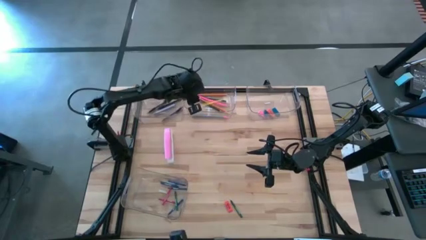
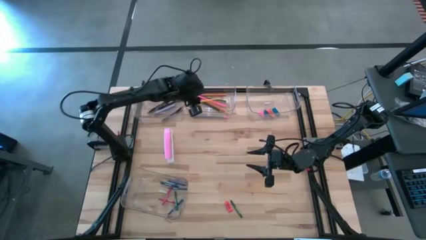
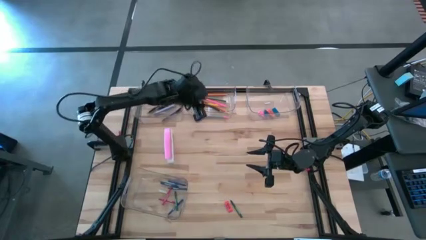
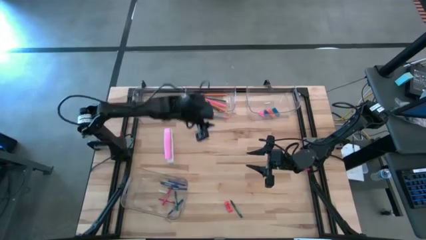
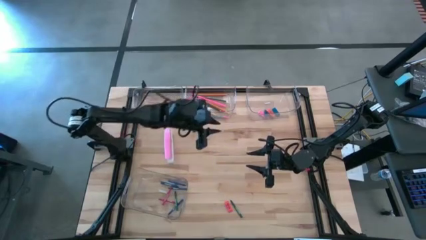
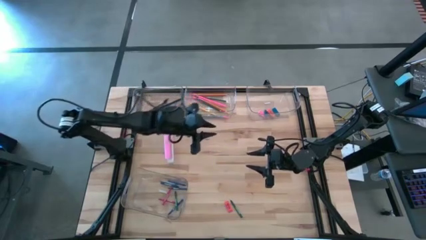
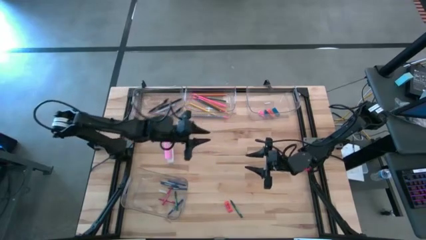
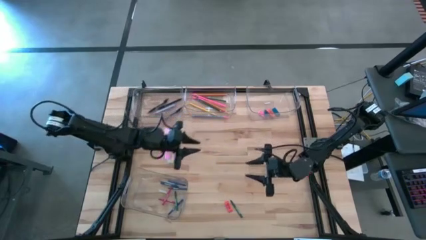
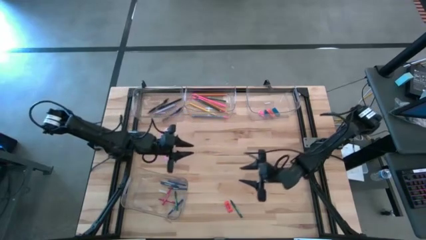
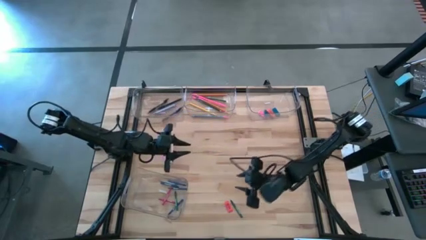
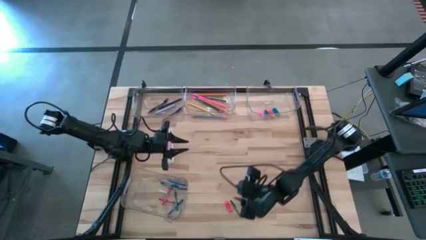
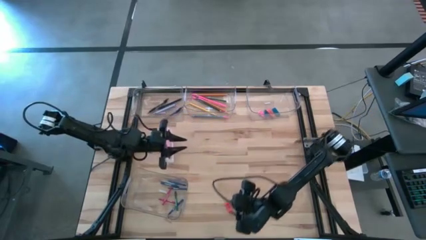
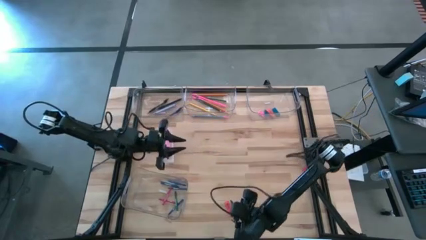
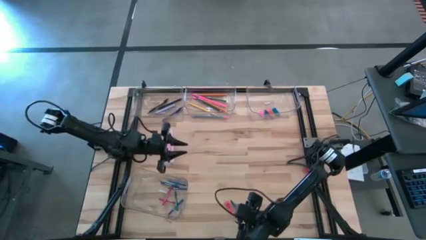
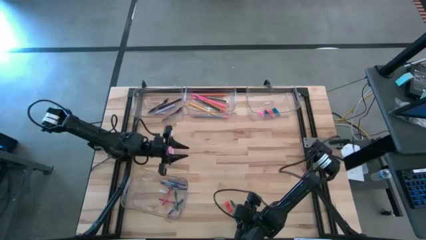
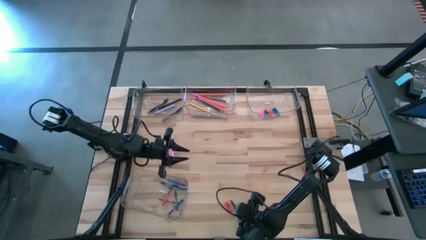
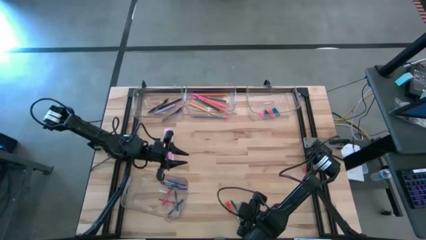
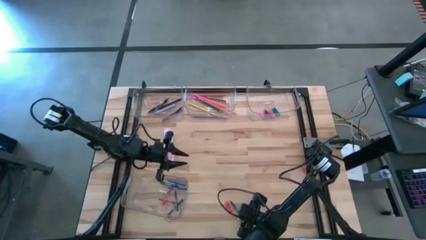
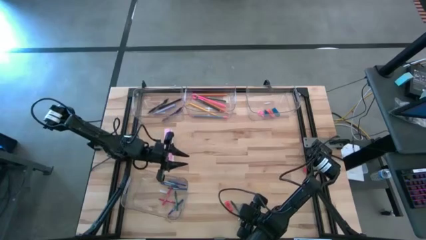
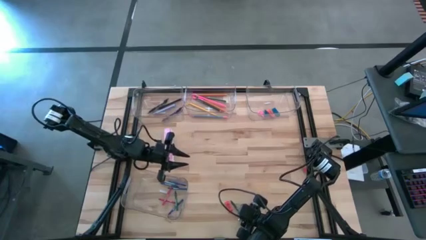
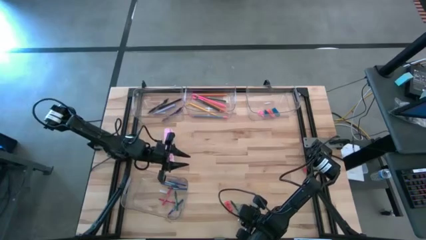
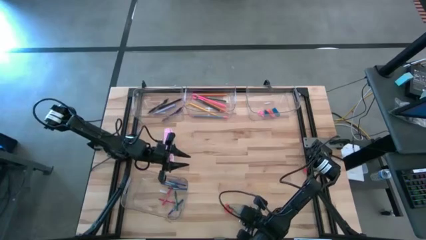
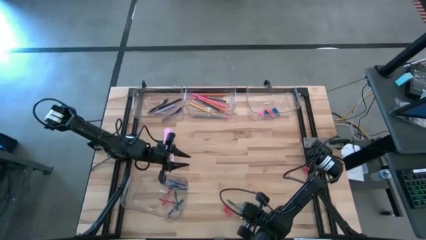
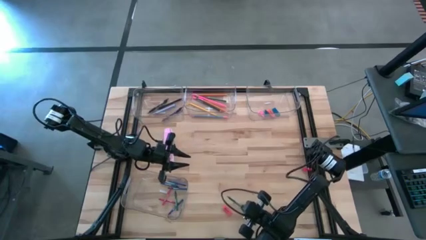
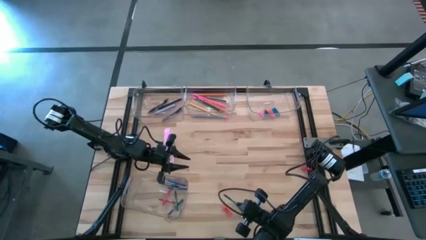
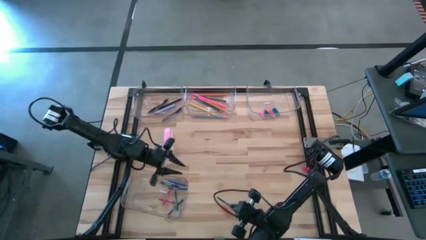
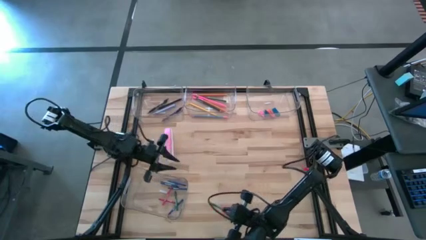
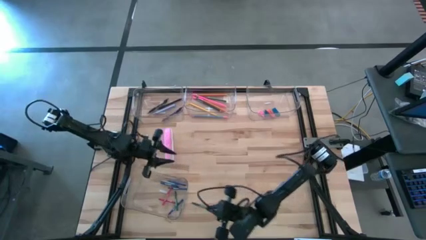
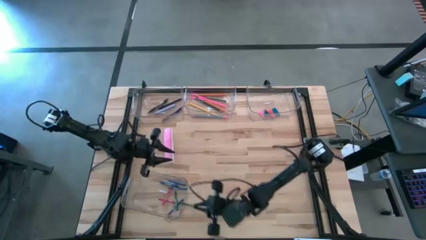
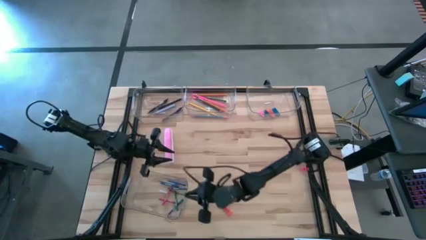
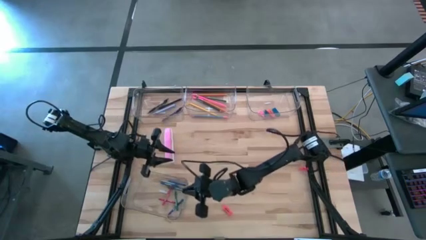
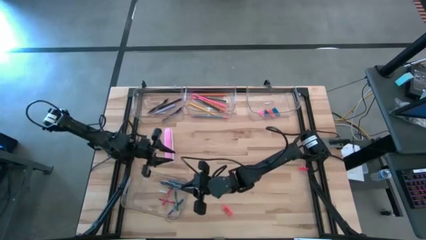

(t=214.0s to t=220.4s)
Task: Sort crayons/erasers/pens/pencils in bins
Put the green crayon into the bottom left transparent bin

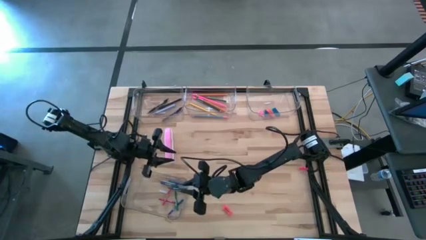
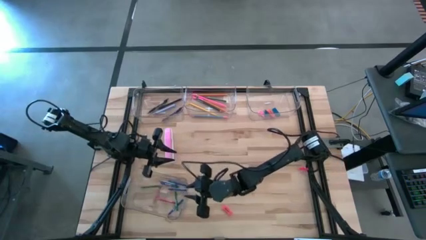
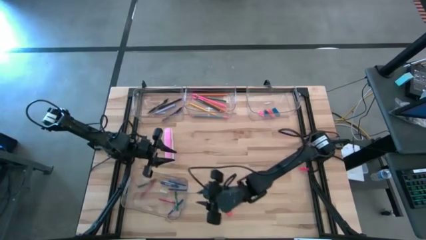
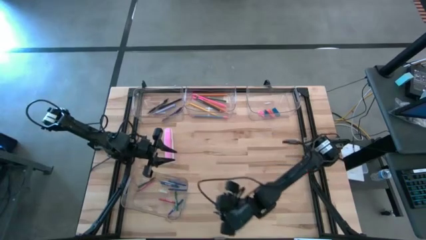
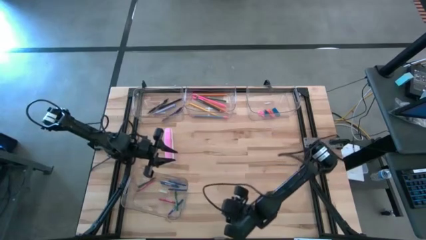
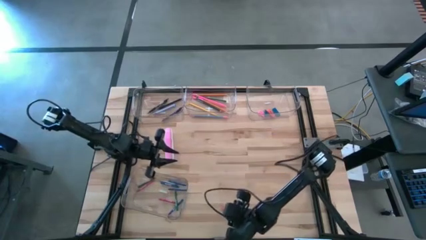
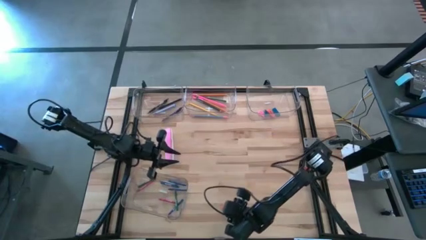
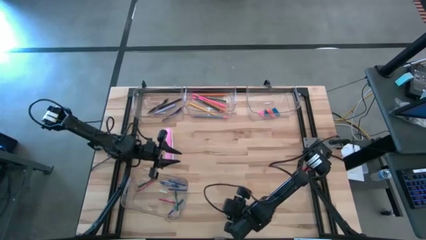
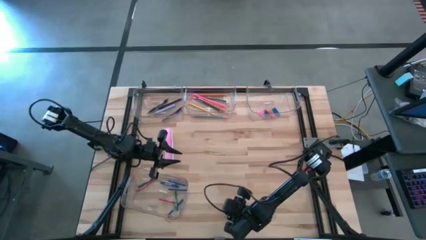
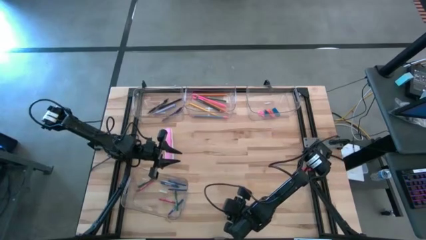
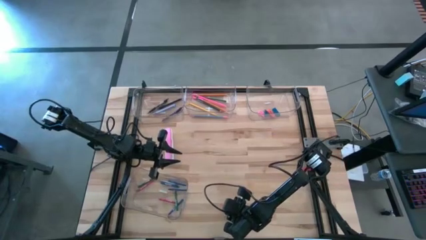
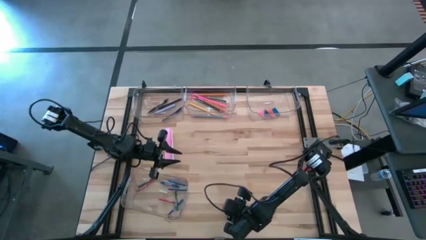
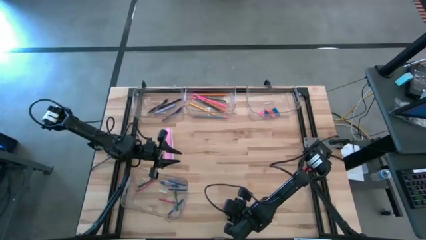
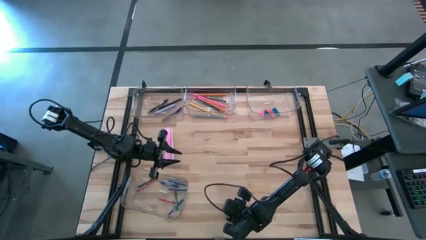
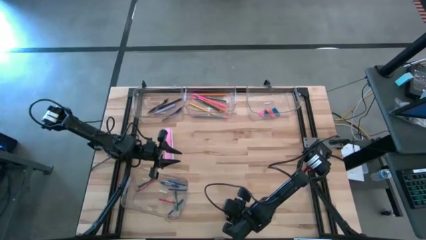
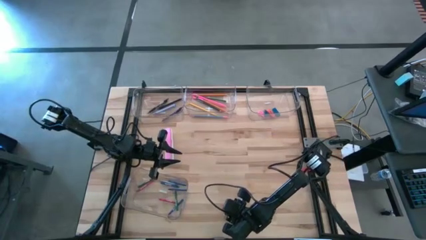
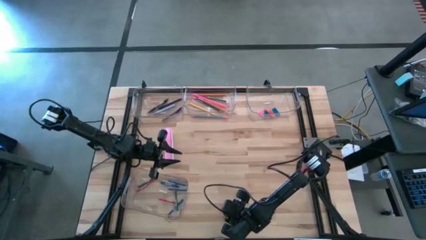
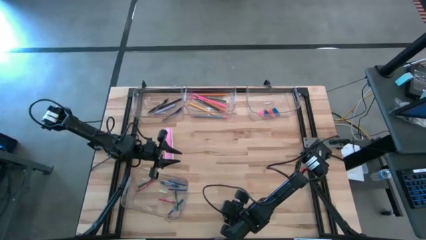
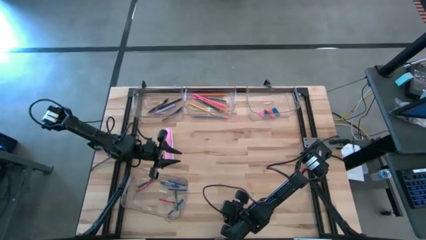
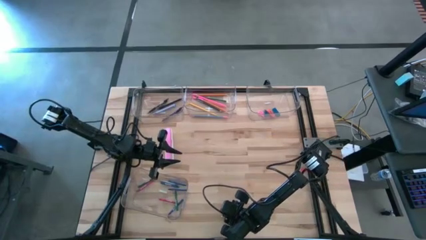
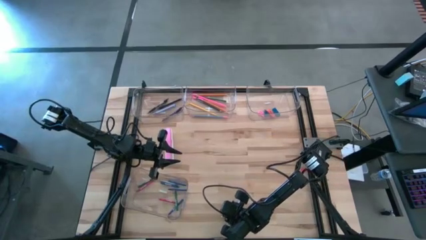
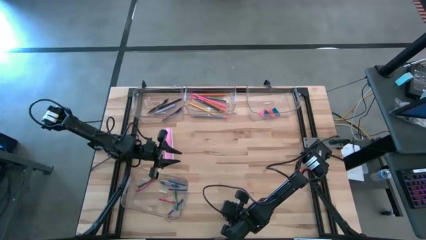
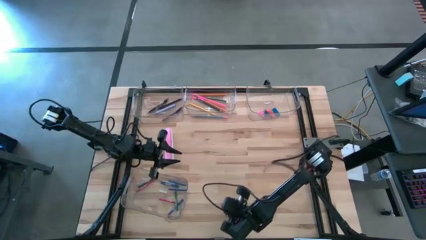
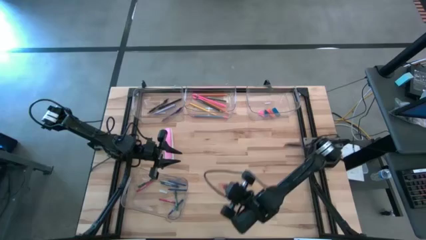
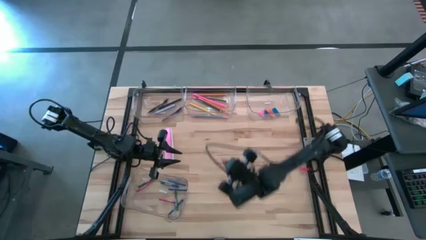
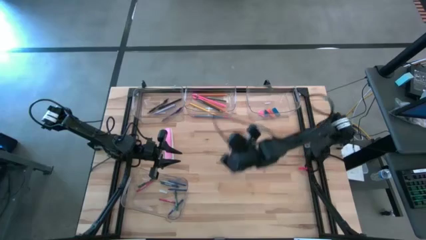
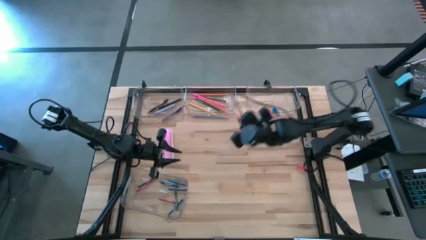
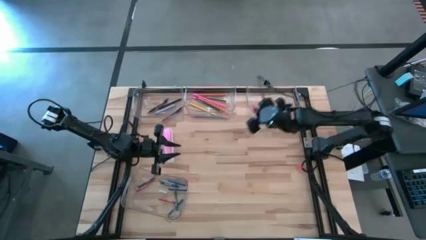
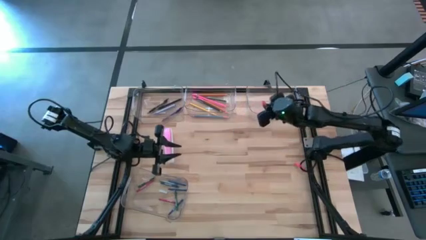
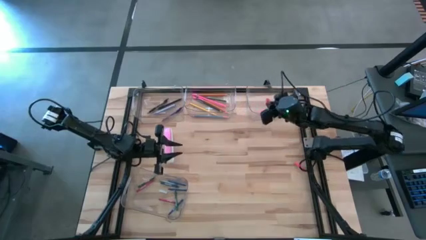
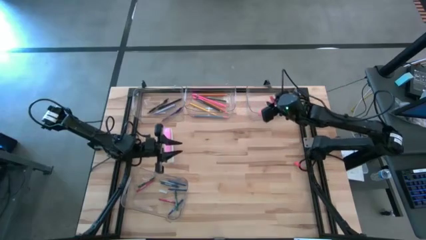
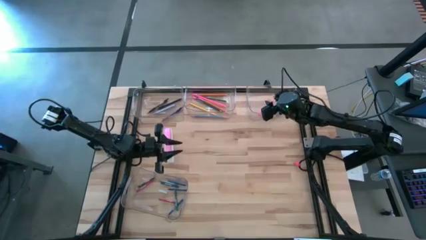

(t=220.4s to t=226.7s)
Put the orange eraser into the top right transparent bin
